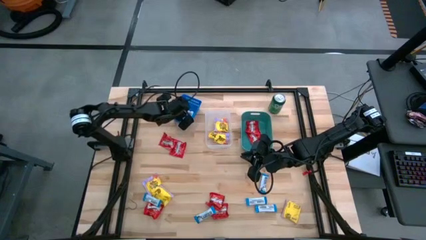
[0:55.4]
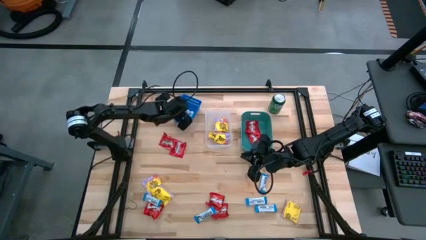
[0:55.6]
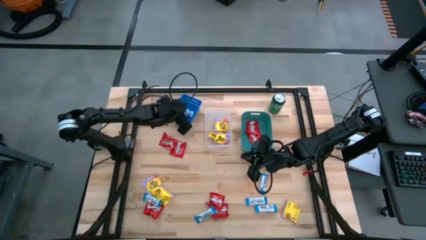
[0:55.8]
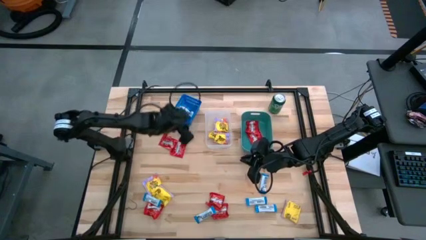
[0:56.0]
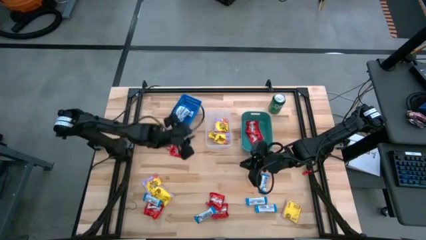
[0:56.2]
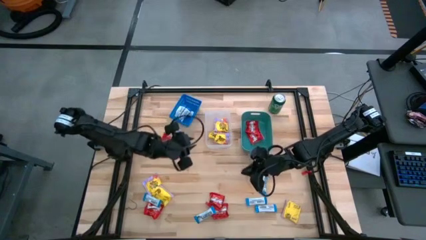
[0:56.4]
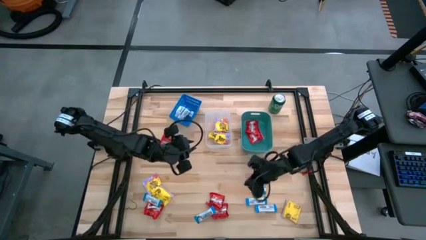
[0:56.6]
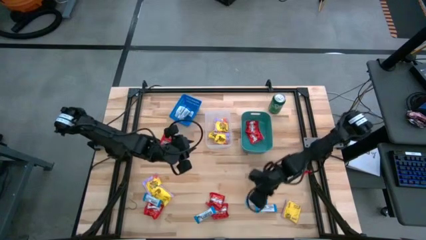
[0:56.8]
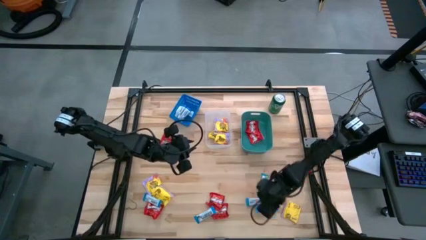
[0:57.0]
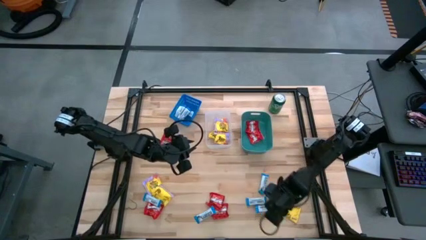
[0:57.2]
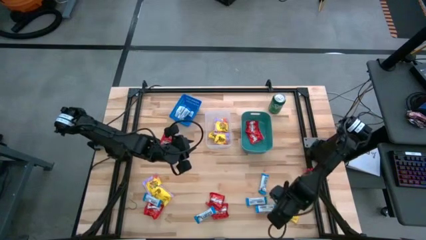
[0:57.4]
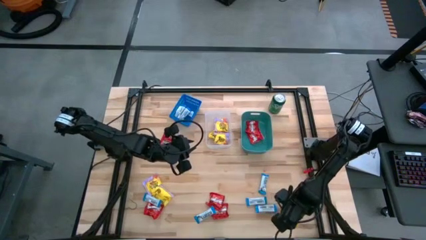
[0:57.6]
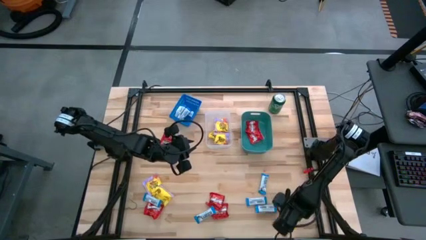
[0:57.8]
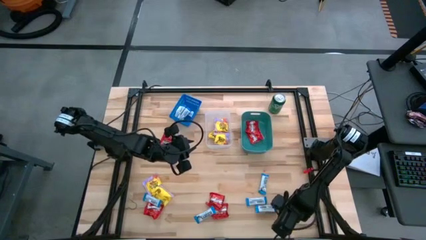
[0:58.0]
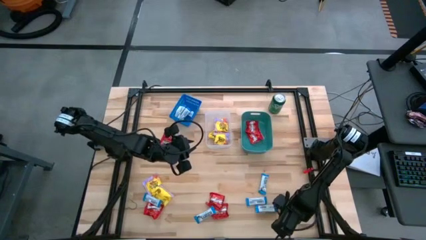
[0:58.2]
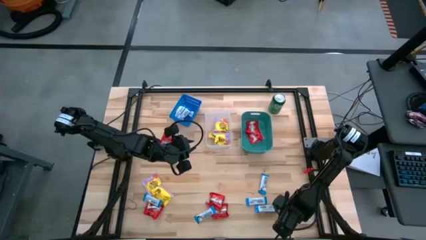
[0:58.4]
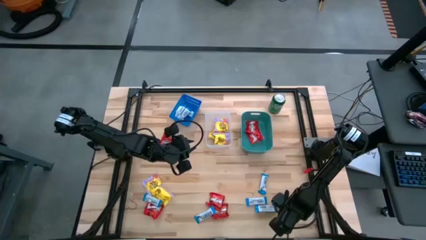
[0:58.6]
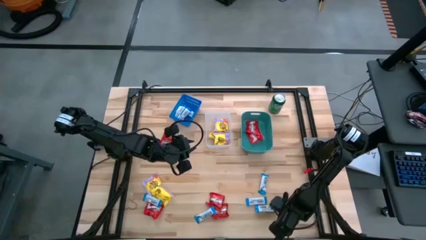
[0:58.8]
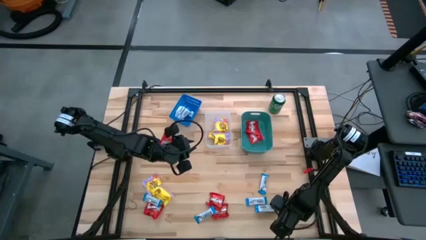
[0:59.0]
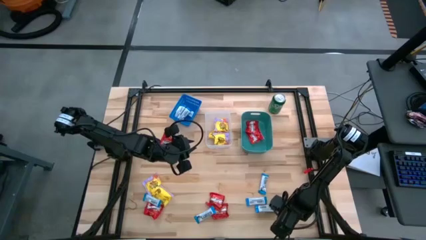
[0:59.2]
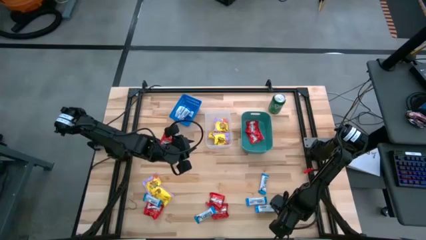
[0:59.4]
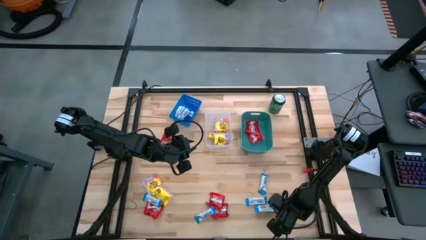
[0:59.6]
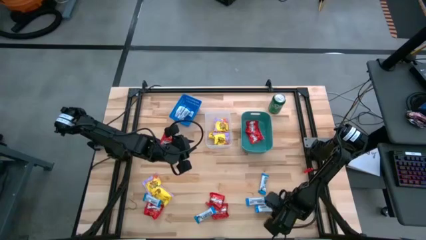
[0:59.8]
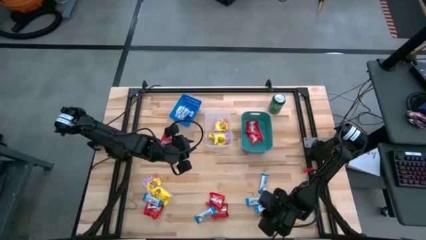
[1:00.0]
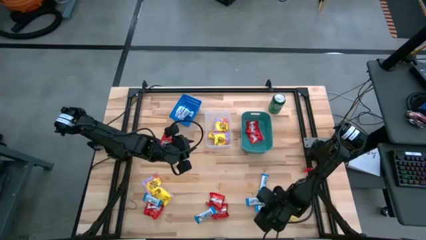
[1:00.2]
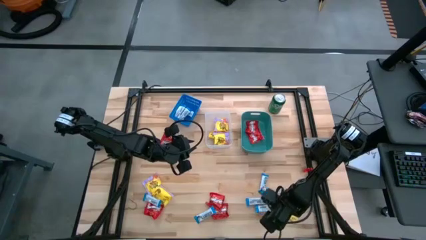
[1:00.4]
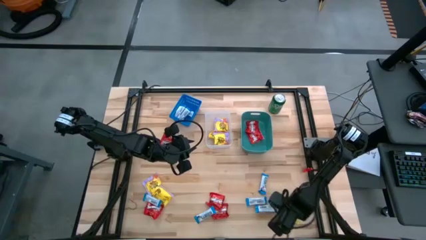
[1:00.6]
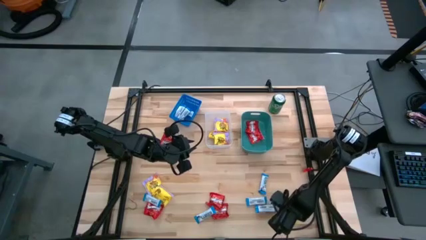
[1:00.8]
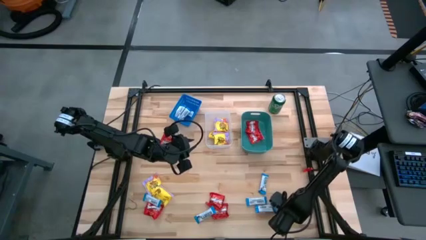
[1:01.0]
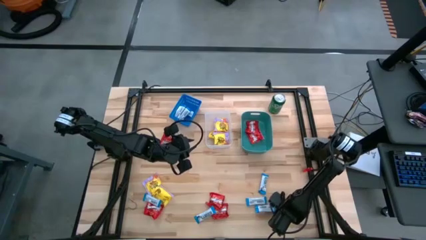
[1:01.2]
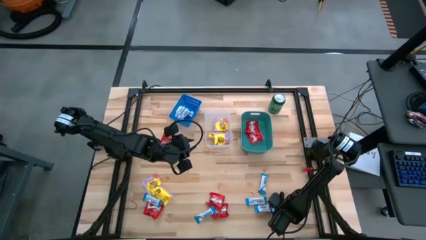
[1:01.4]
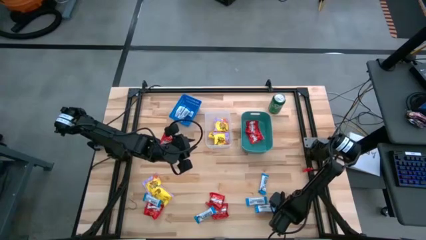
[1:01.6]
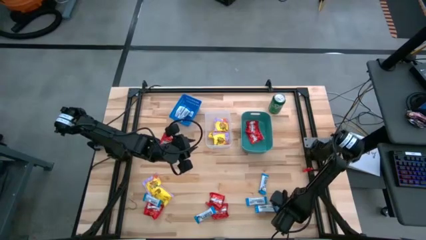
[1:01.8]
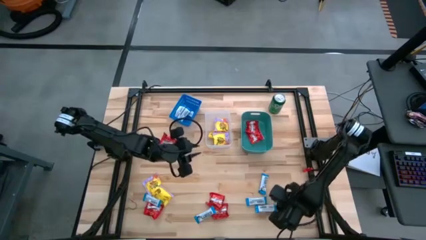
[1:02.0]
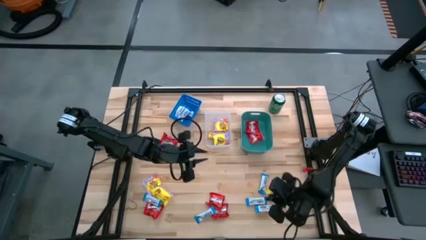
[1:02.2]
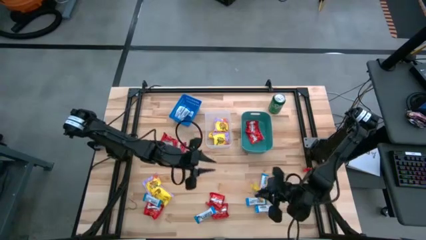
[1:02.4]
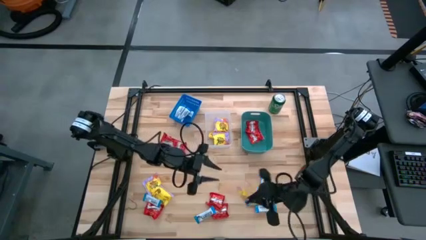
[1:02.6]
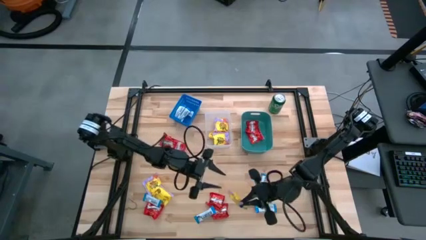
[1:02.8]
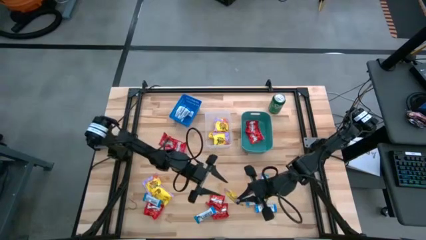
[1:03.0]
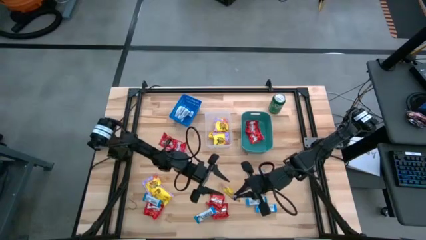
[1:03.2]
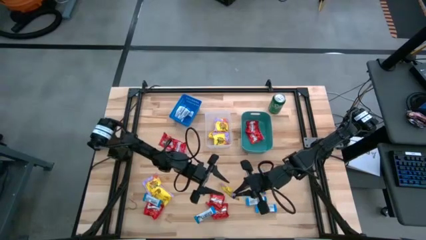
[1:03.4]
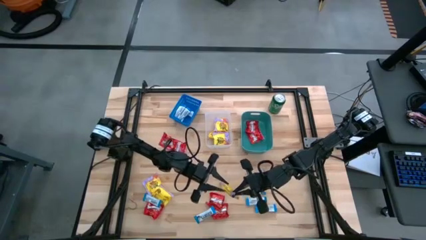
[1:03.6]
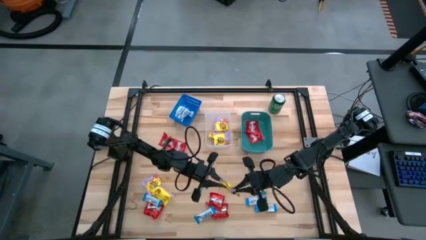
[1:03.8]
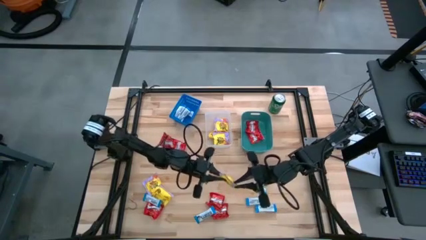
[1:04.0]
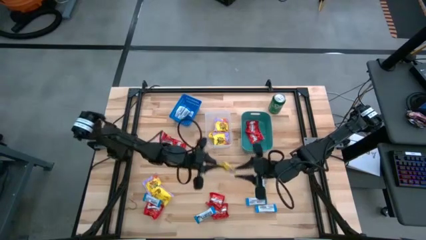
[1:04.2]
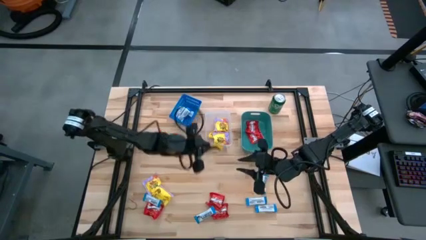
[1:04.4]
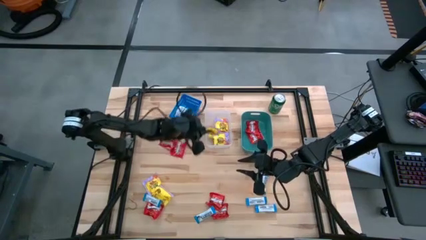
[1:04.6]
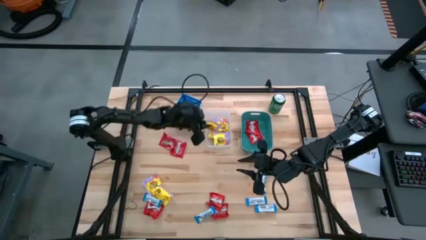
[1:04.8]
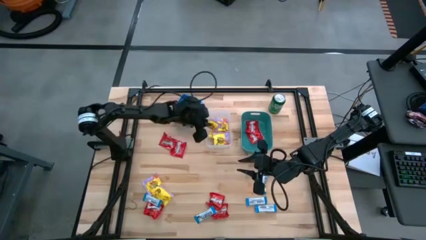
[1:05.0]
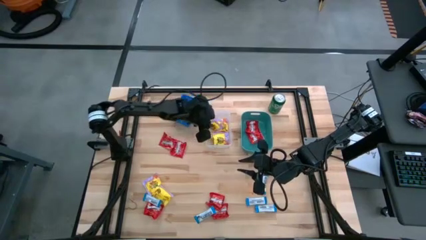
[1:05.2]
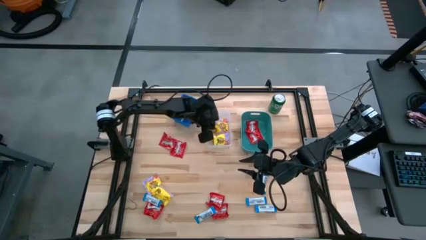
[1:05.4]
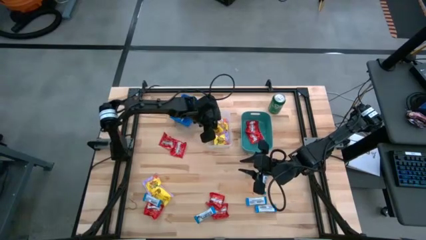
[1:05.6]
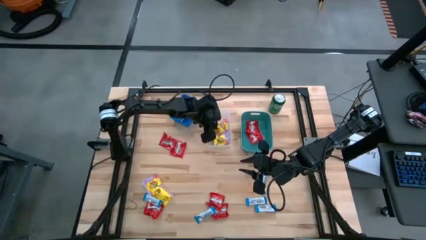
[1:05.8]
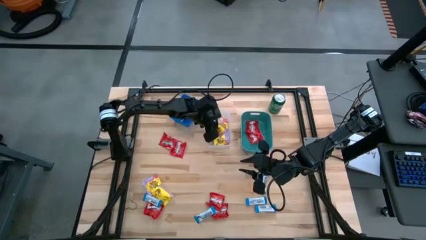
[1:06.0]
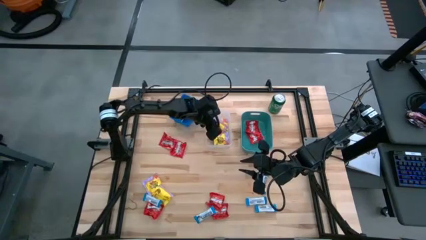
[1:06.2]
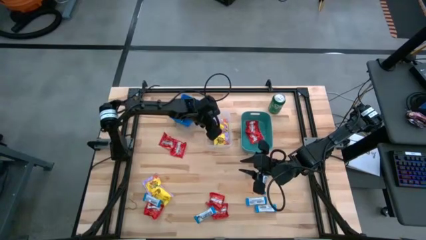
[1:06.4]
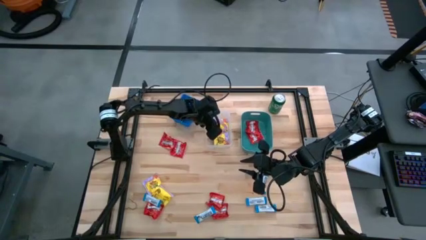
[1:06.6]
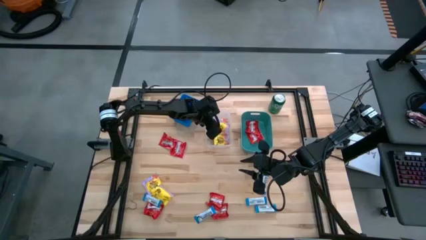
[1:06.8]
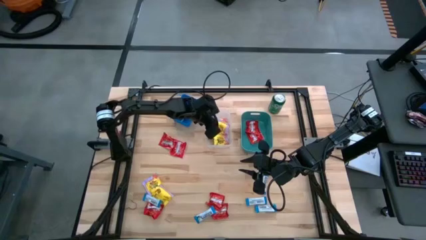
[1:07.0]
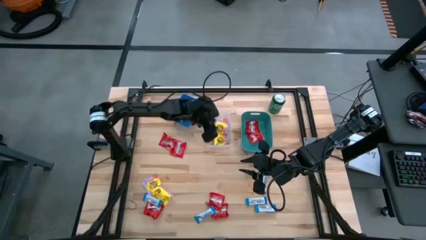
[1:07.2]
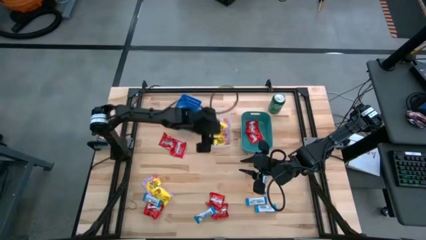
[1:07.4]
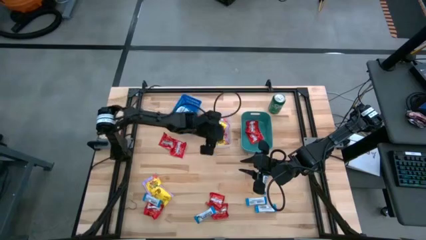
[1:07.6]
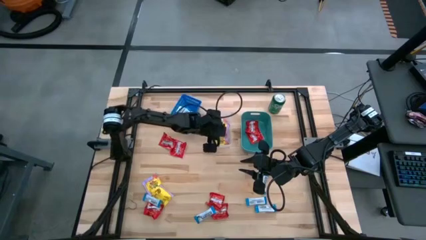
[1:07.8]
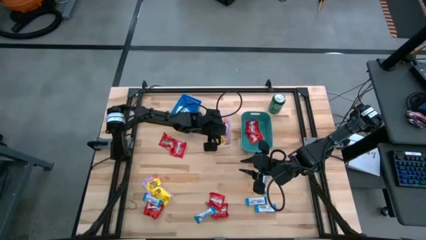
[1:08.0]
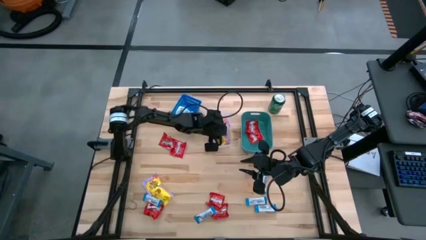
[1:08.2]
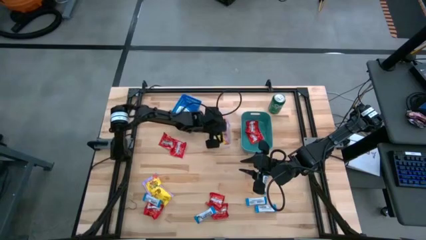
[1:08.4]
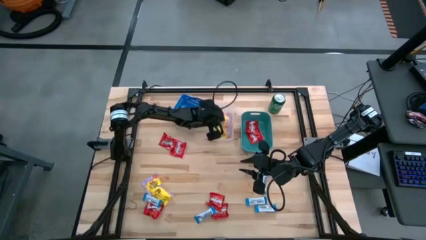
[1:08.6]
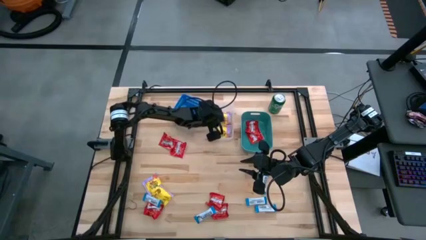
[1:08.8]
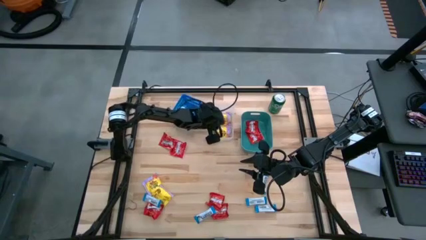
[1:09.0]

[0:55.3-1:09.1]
Task: Sort candy
Put the yellow candy into the transparent bin

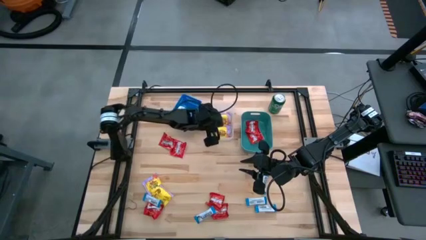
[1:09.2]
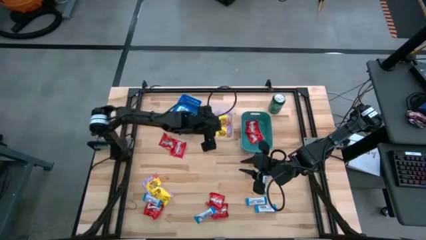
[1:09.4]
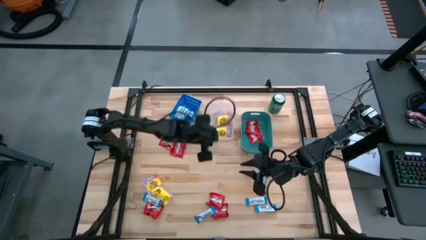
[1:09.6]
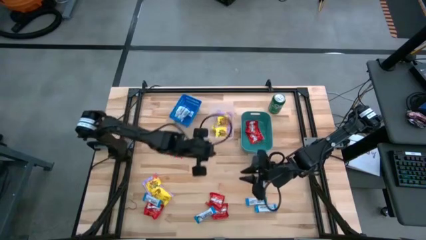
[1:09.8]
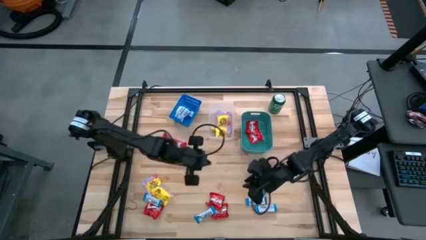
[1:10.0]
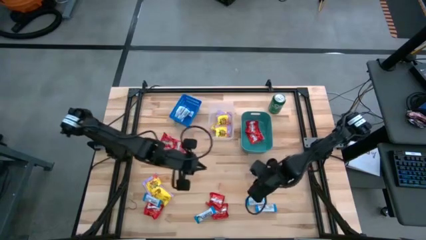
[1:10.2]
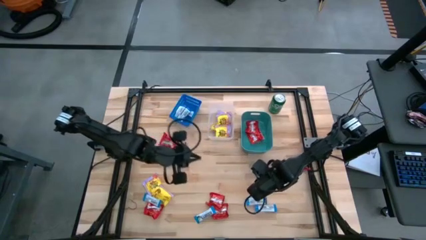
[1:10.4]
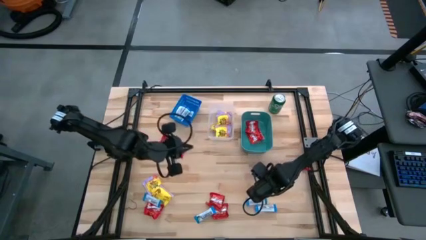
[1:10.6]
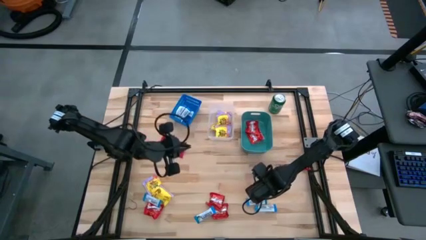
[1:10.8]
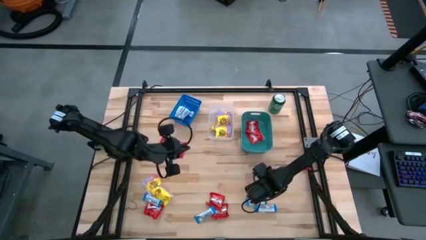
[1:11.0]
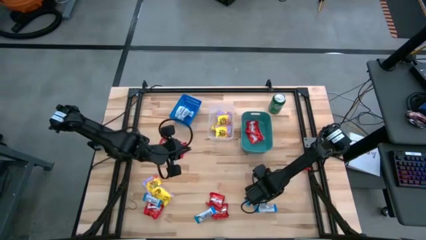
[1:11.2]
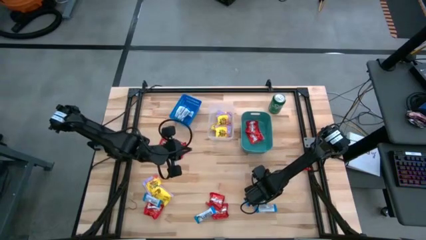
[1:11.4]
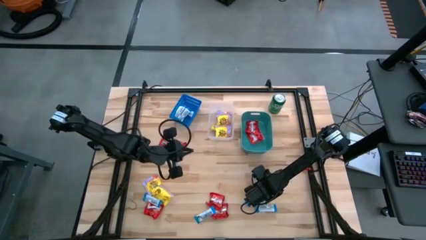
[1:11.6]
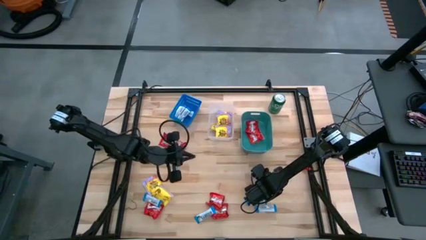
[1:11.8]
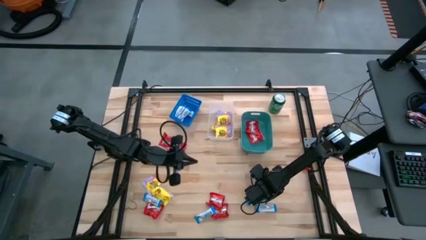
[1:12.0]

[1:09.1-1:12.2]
Put the white chocolate bar into the blue bin
